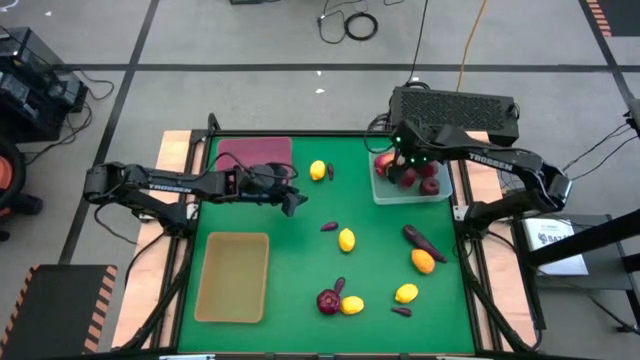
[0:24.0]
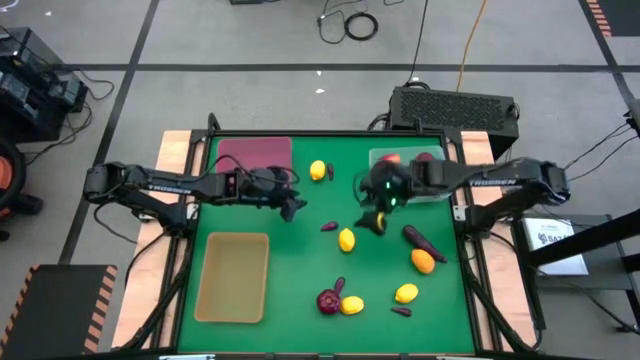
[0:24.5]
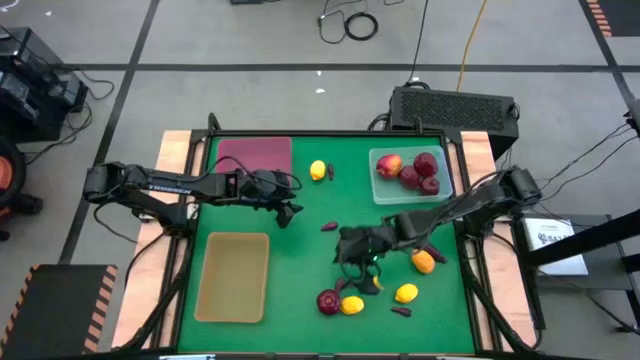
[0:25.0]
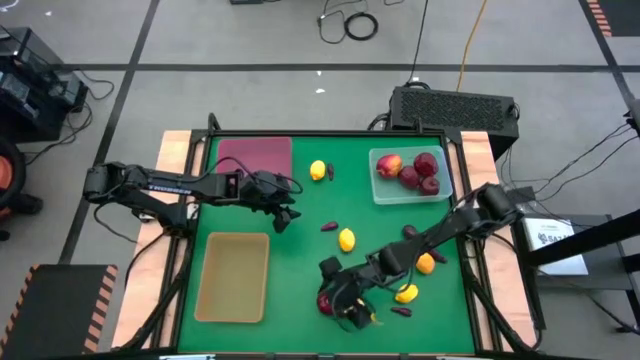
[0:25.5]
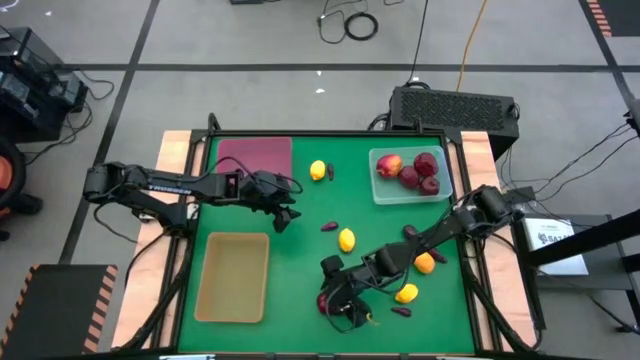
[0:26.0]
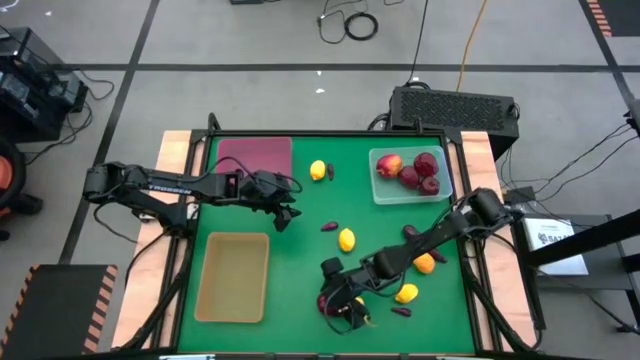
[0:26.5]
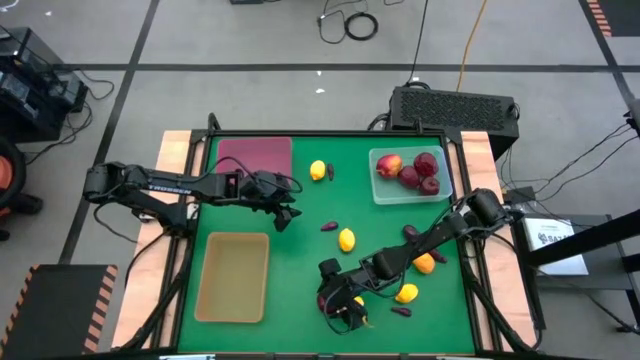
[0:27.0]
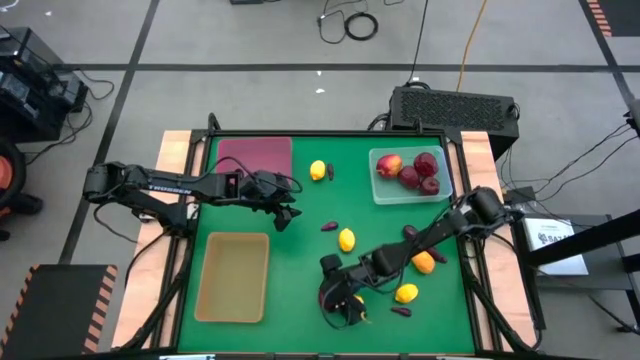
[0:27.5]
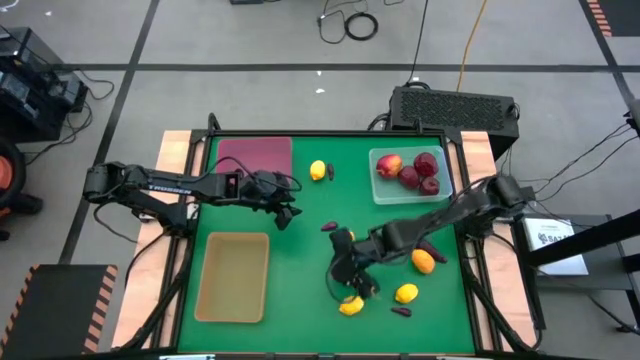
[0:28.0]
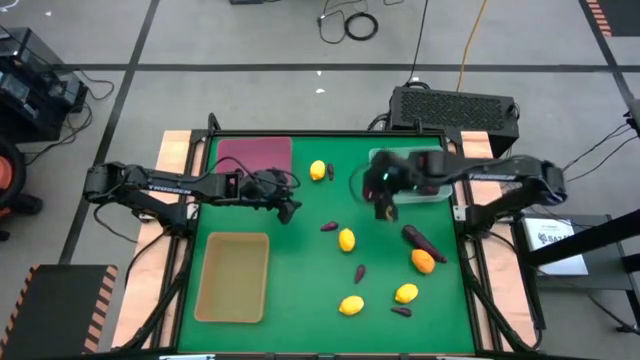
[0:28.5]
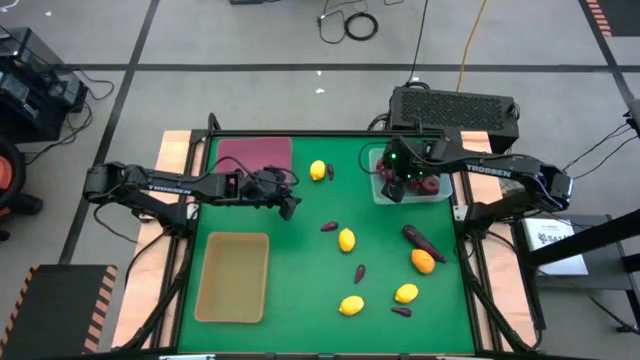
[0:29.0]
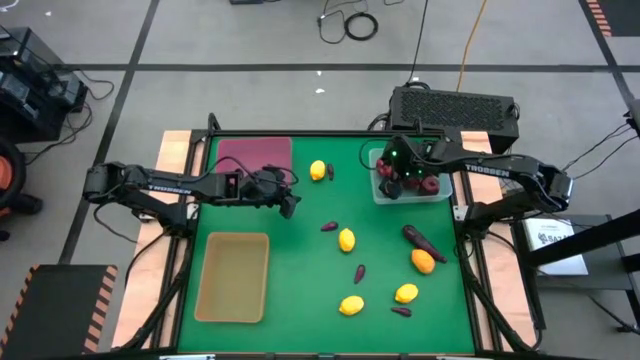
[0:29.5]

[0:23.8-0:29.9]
Task: Sort produce into baskets
Put the apple into the transparent bin

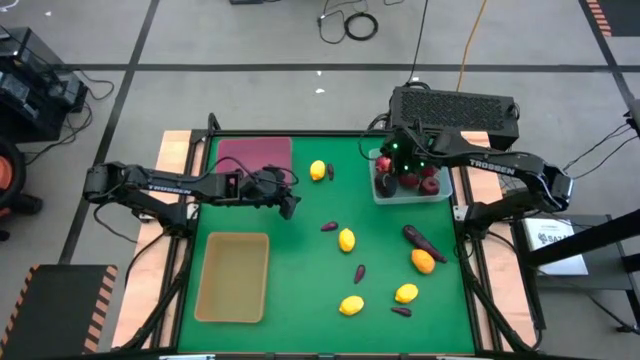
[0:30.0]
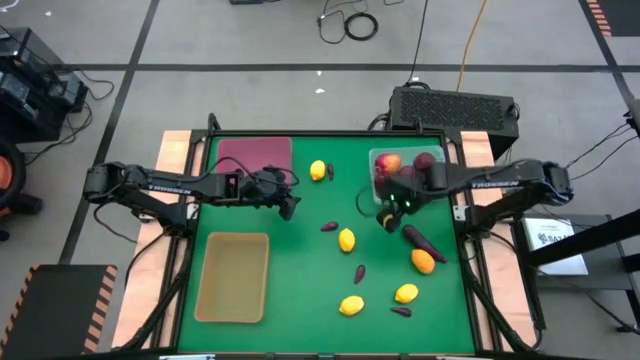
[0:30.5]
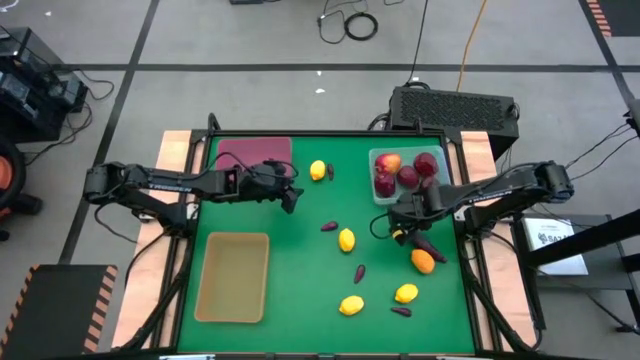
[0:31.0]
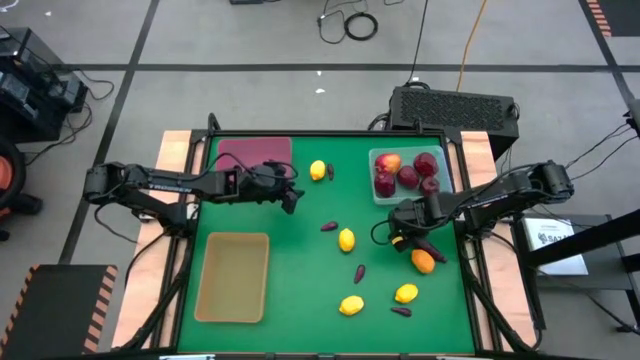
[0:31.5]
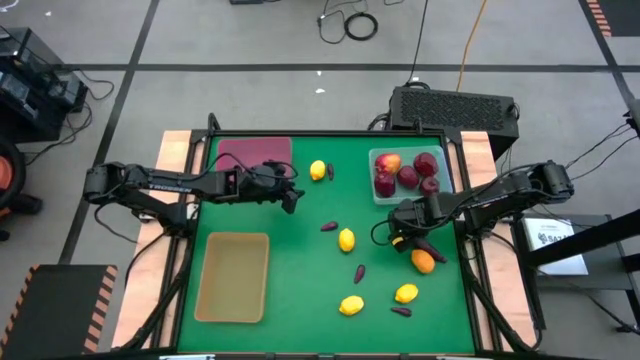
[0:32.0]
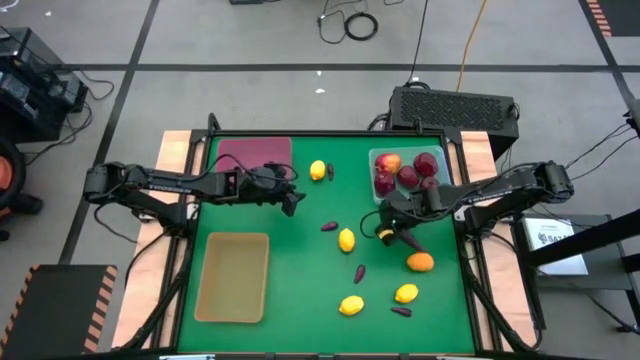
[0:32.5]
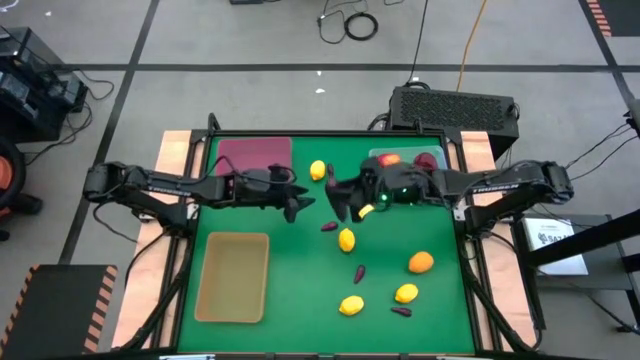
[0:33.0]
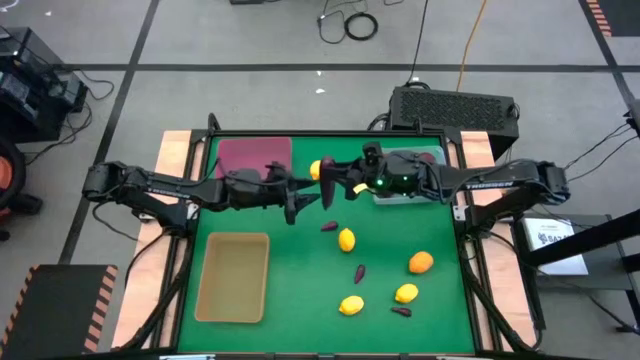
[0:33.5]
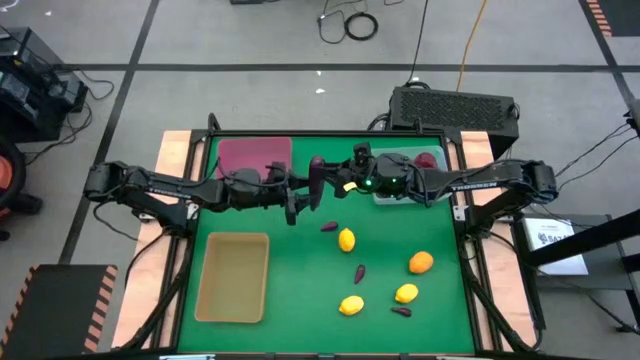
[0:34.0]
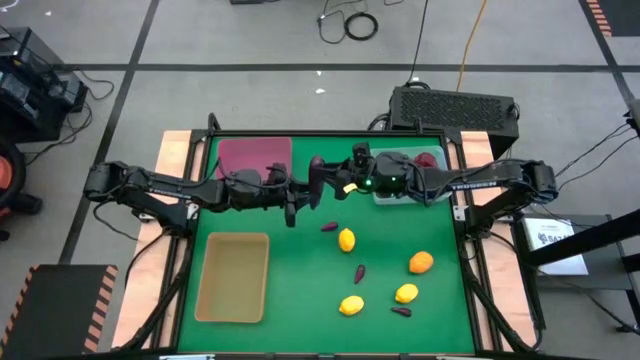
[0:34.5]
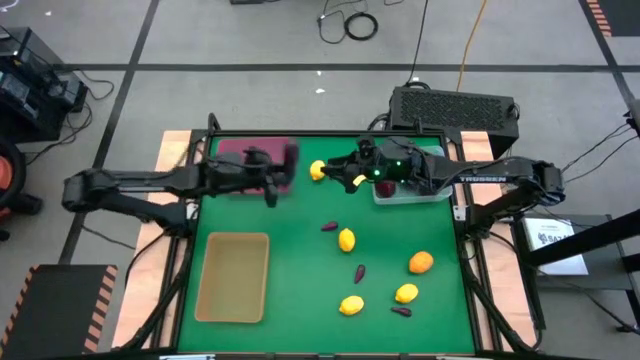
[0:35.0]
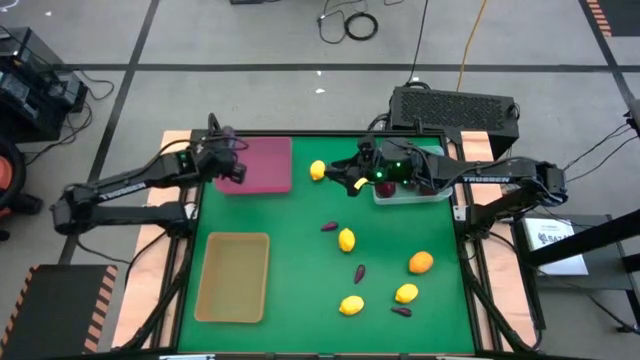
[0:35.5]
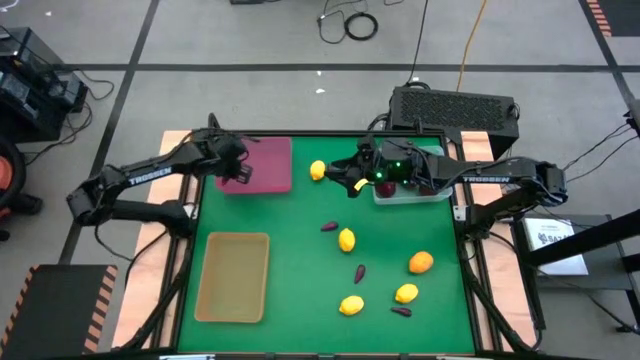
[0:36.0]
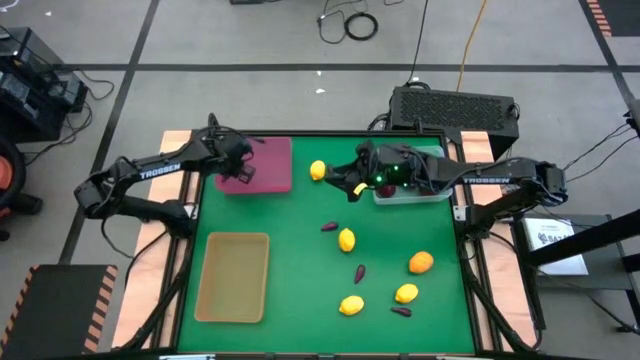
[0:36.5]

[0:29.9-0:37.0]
Put the eggplant into the pink bin

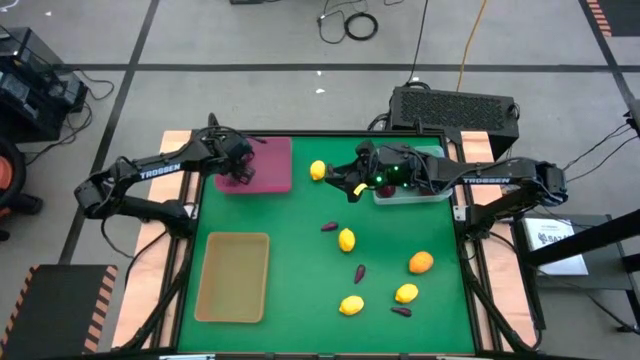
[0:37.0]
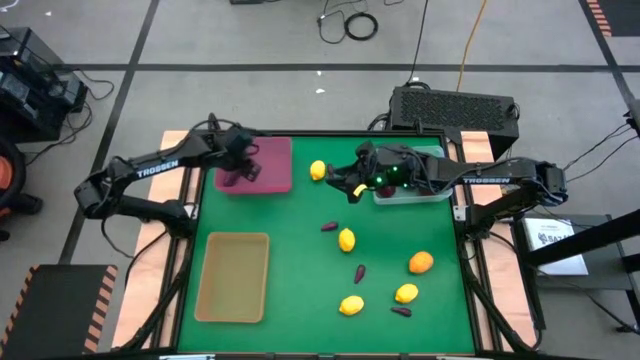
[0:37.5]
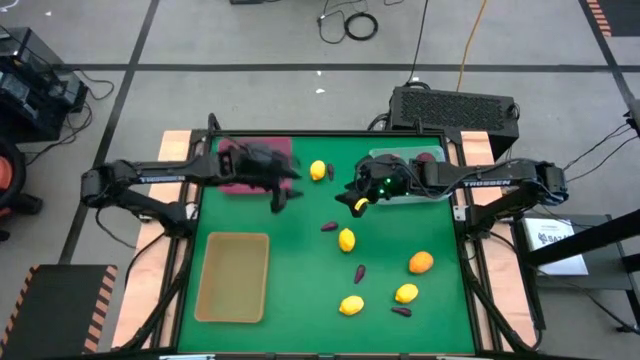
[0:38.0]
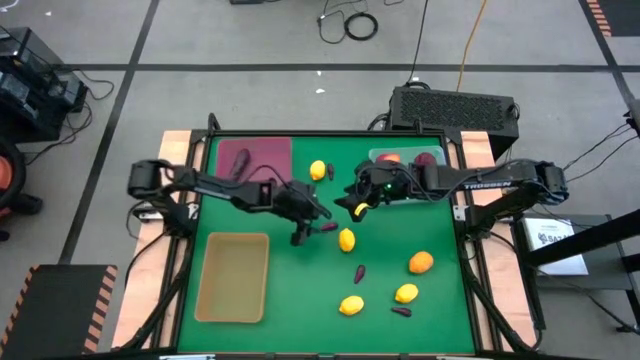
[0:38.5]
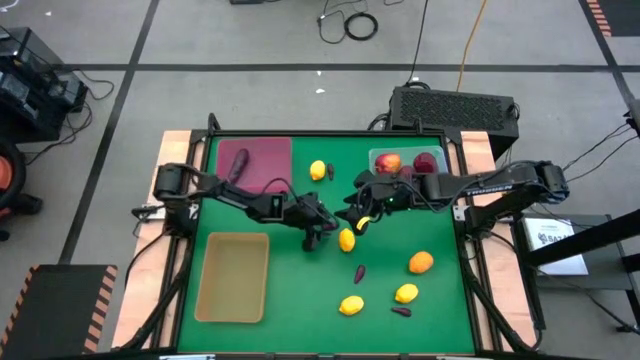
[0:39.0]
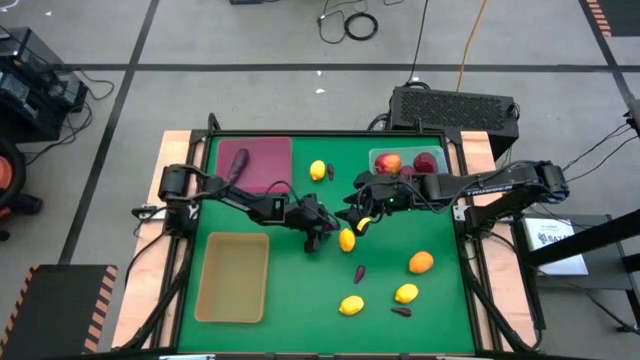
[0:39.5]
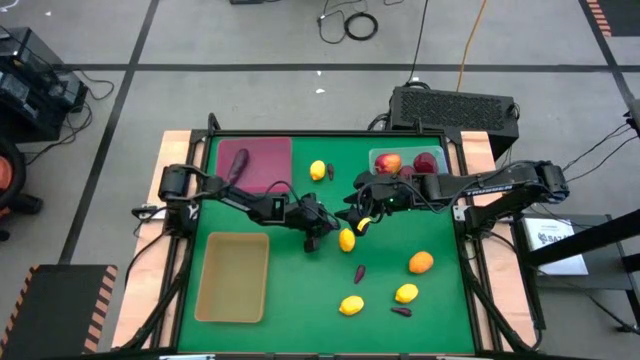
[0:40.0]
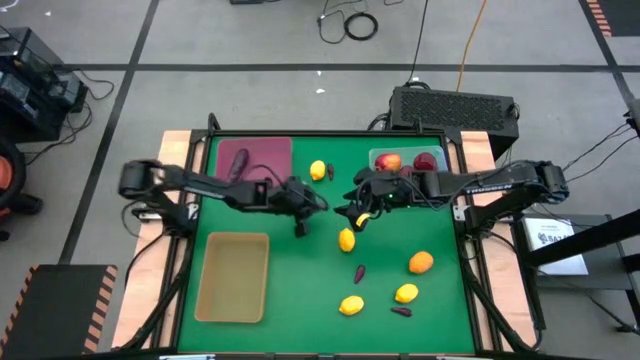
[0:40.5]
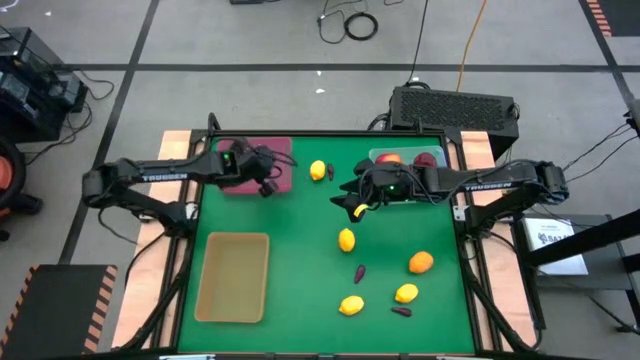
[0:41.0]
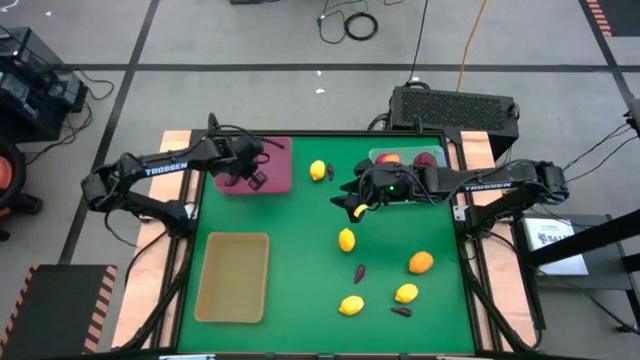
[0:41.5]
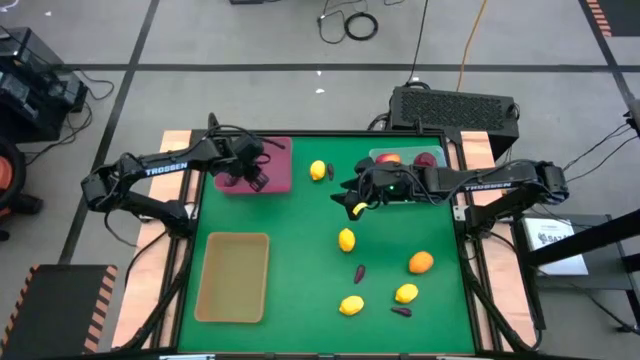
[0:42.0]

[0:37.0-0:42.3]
Put the eggplant into the pink bin

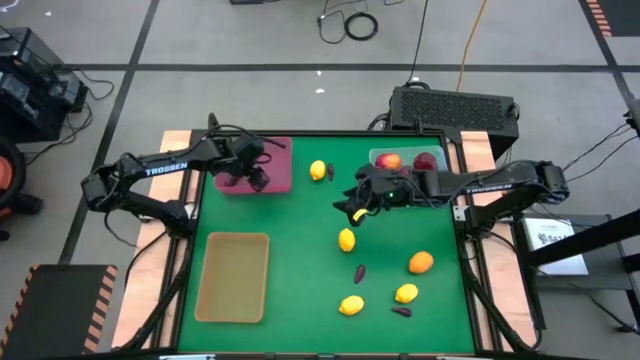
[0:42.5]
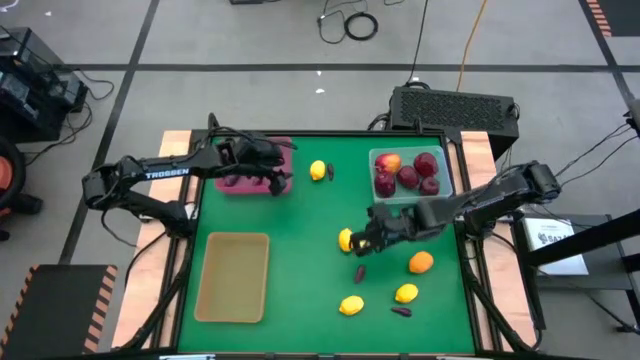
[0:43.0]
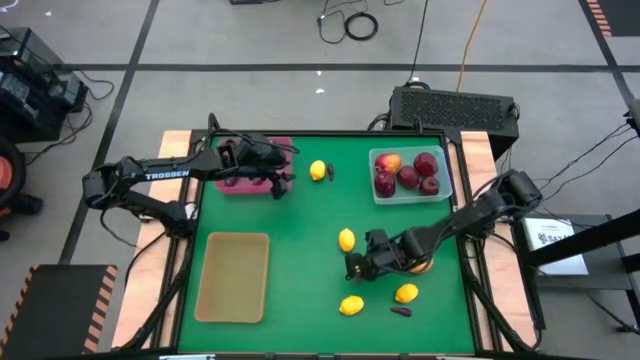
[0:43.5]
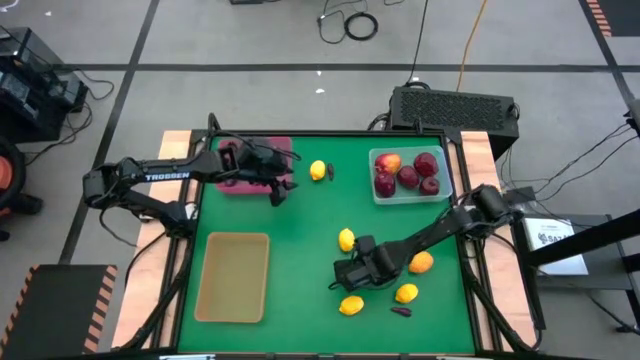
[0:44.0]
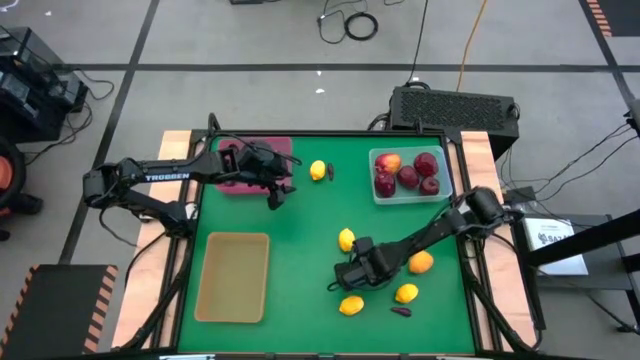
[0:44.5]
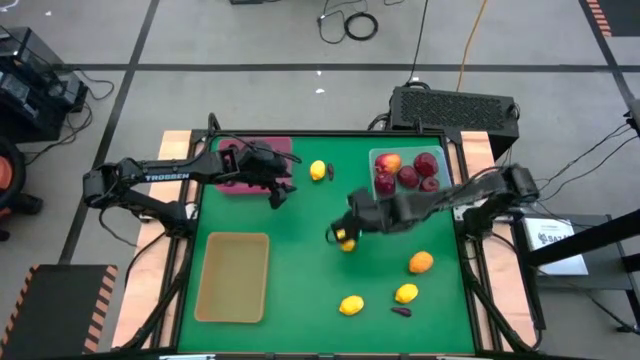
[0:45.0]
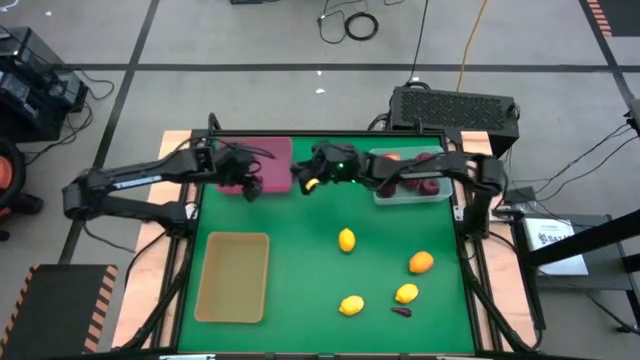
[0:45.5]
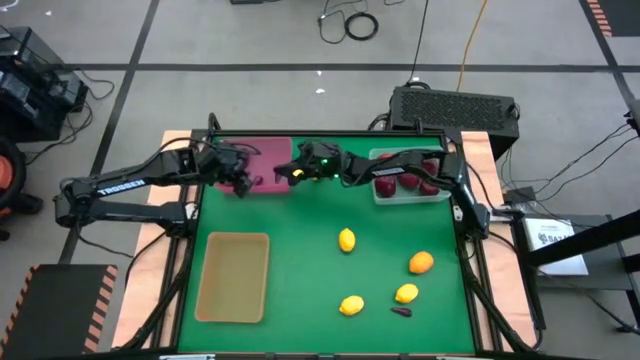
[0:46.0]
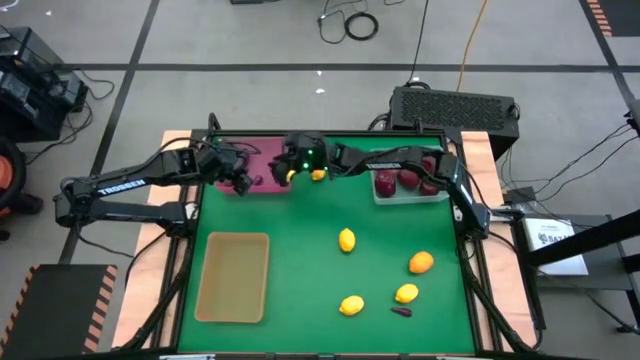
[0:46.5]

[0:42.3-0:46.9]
Put the eggplant into the pink bin
